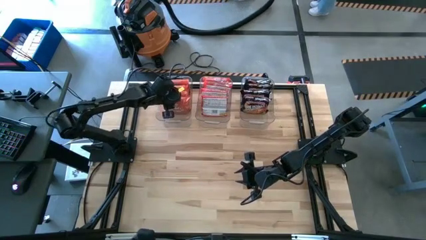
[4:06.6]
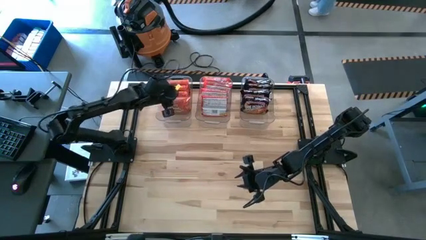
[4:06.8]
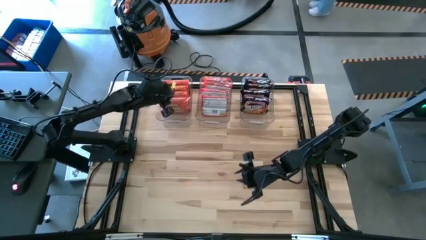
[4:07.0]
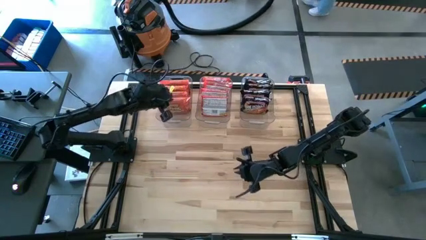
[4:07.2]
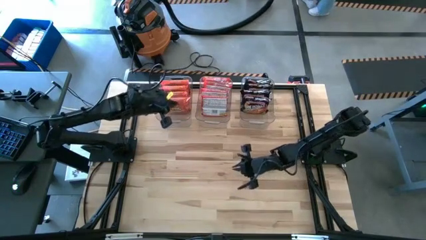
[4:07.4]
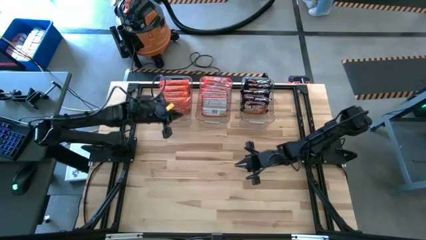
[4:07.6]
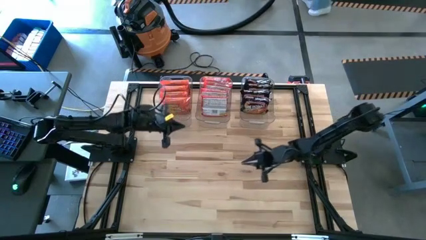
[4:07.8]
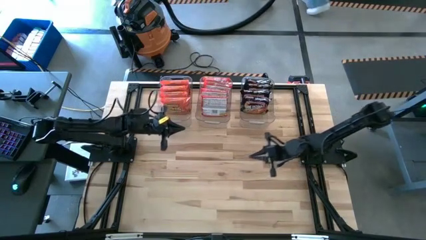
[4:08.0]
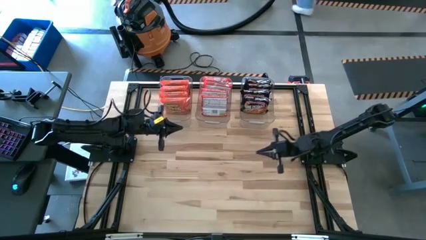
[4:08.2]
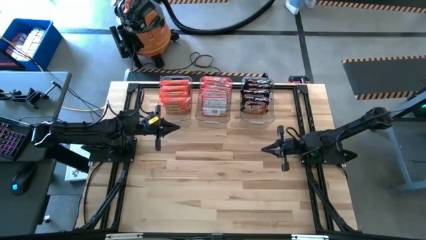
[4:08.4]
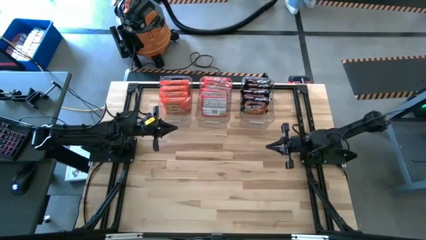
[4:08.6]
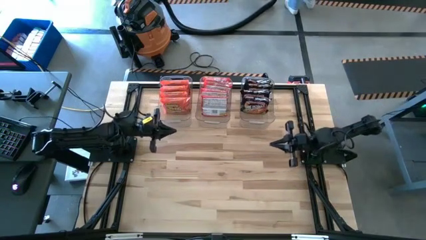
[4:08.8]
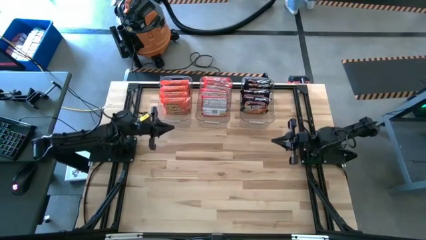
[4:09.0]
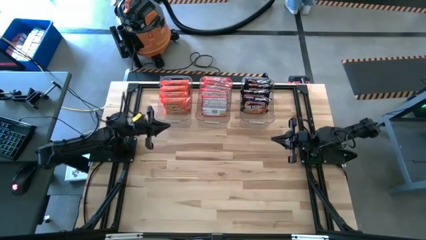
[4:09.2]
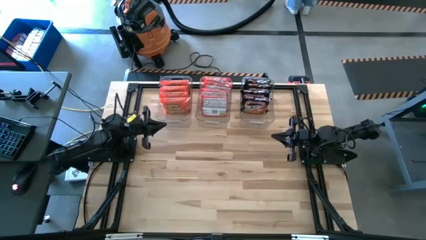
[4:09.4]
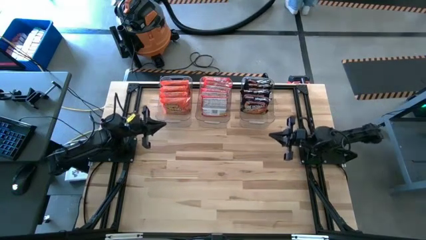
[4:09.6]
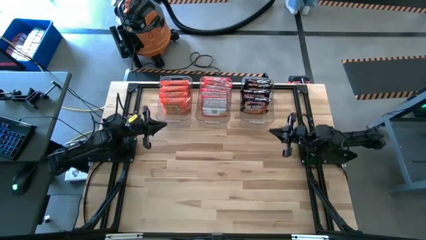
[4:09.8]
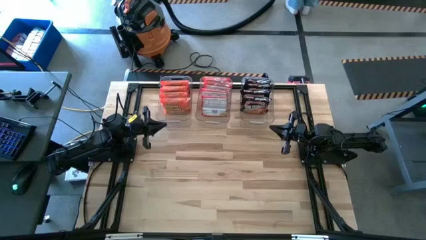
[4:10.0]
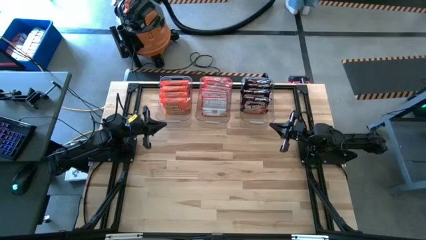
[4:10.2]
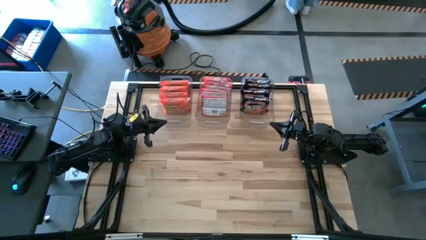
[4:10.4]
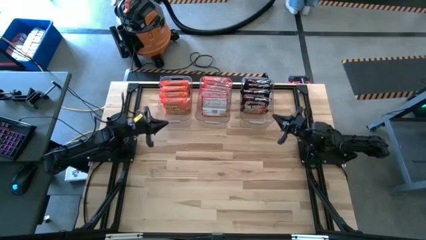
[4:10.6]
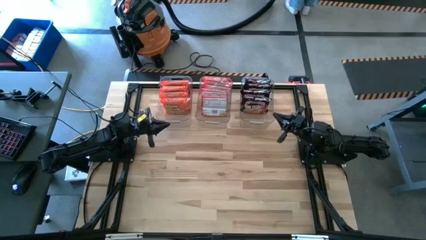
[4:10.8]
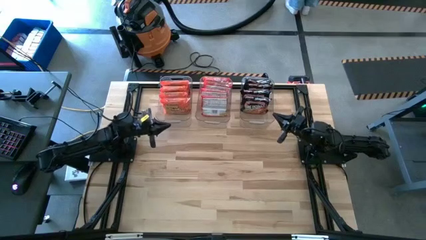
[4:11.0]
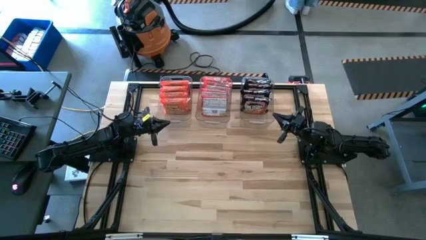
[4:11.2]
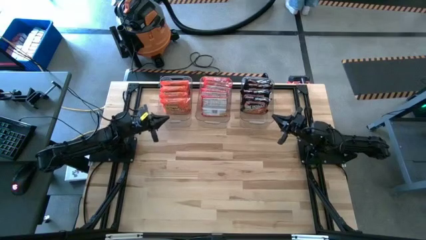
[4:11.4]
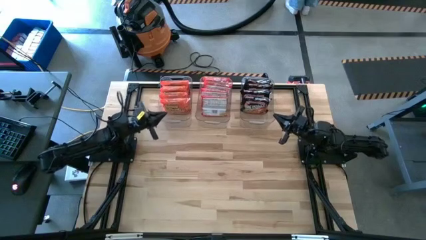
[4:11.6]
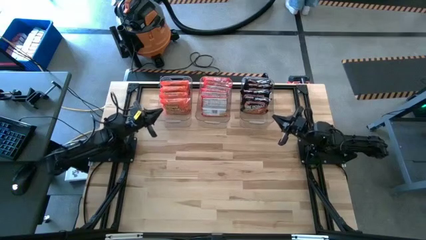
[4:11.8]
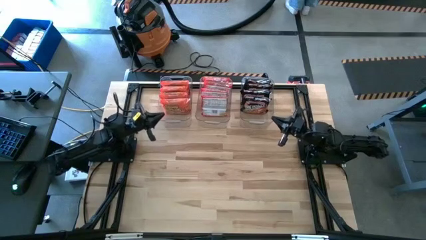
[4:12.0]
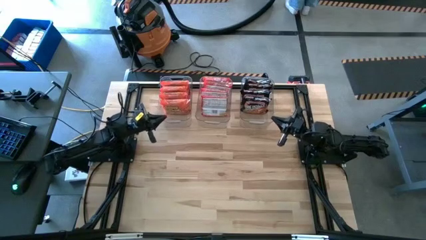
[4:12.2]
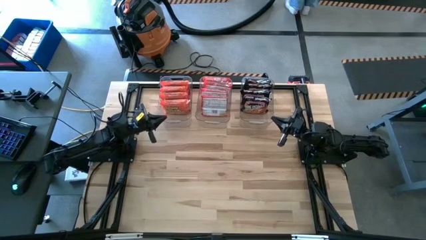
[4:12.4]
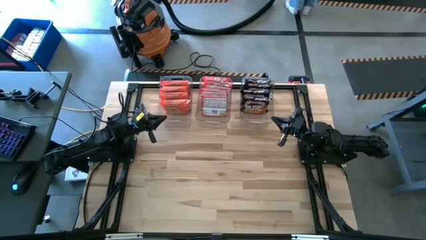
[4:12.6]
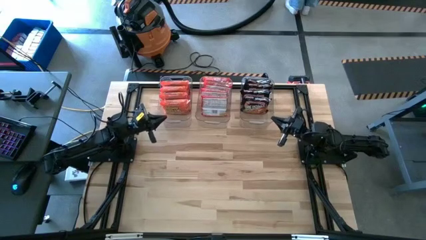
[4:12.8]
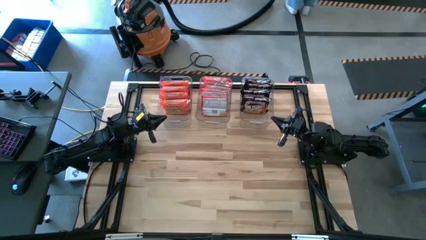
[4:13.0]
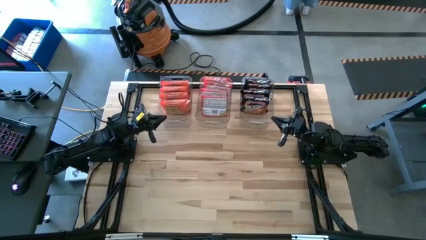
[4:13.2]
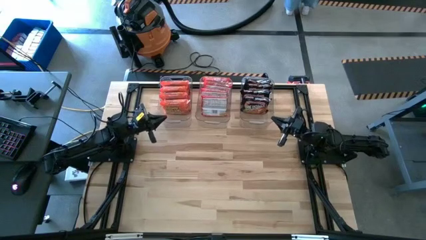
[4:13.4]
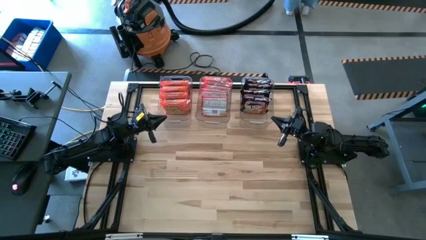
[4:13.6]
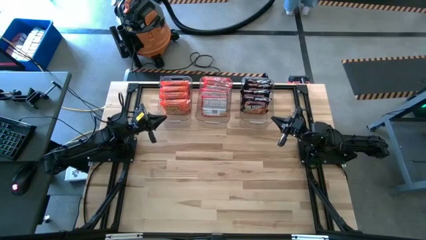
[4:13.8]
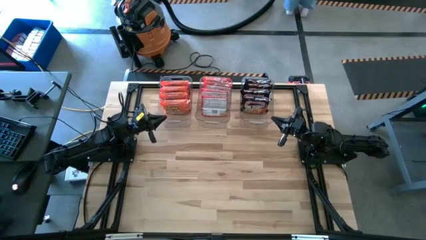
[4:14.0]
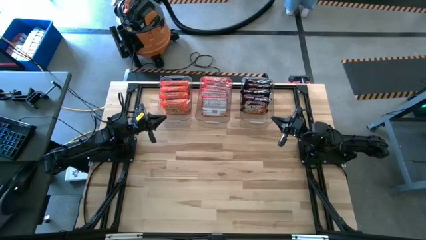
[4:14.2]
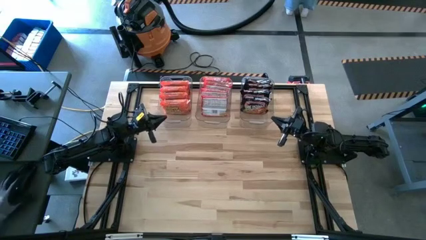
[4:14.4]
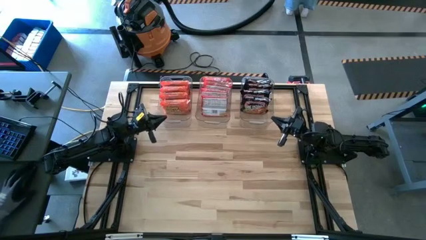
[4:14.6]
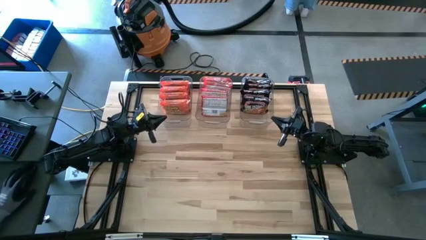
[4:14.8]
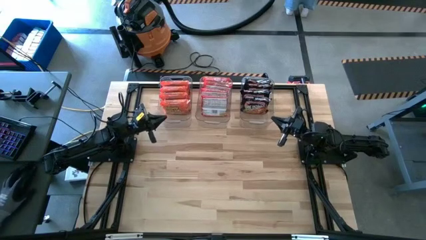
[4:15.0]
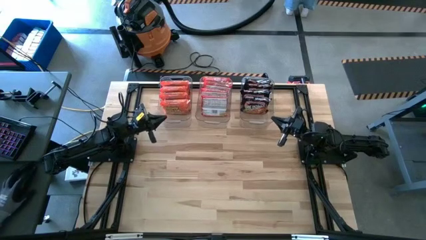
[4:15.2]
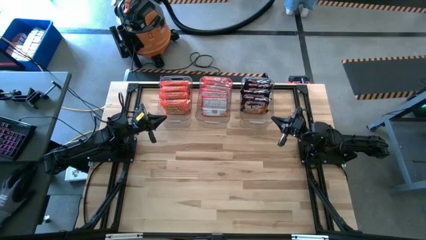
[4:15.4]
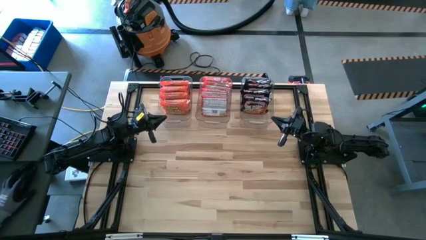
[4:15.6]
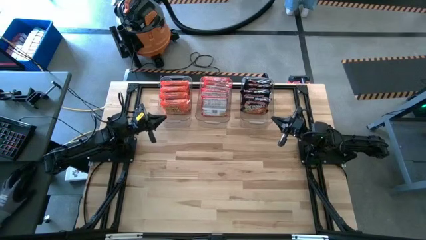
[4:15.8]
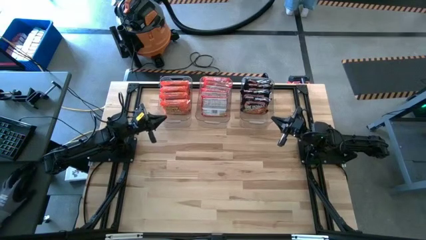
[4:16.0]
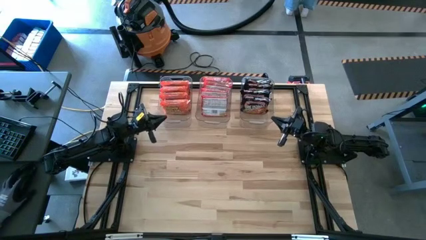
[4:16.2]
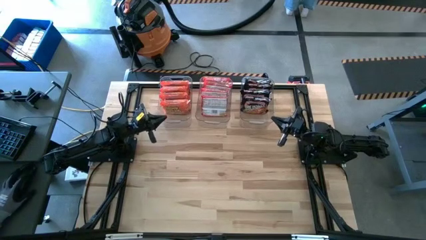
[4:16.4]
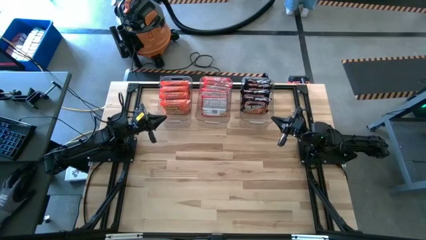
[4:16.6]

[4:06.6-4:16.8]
Task: Sort Maruchan noodles
Return to Home Position

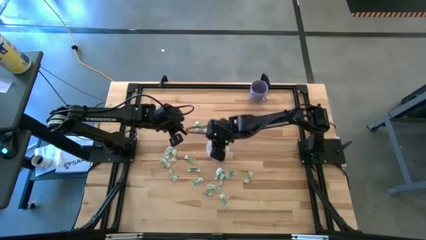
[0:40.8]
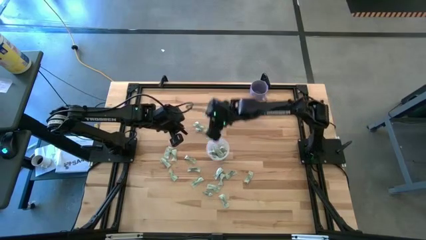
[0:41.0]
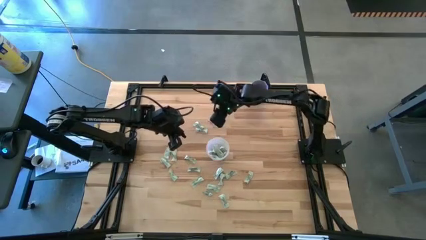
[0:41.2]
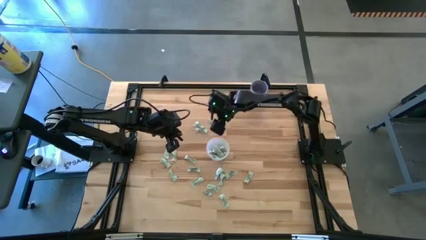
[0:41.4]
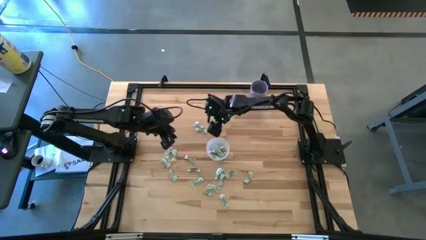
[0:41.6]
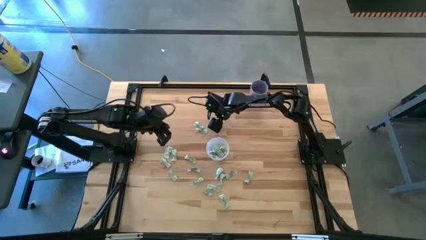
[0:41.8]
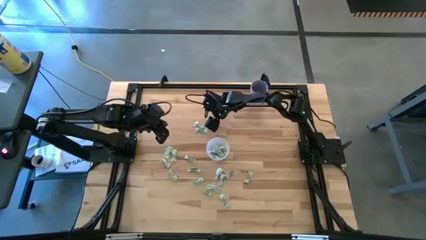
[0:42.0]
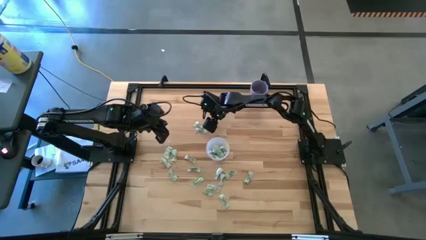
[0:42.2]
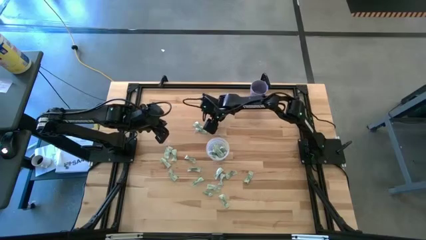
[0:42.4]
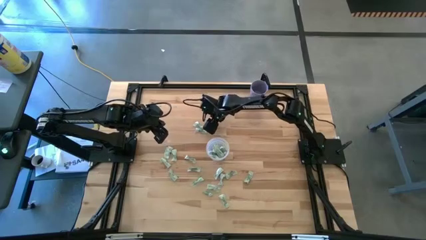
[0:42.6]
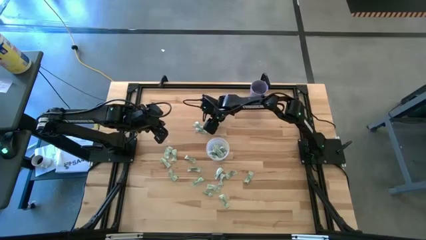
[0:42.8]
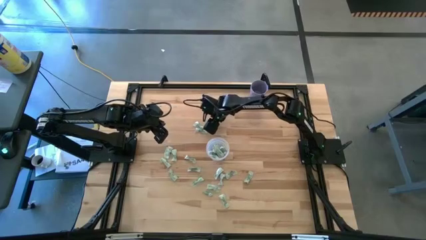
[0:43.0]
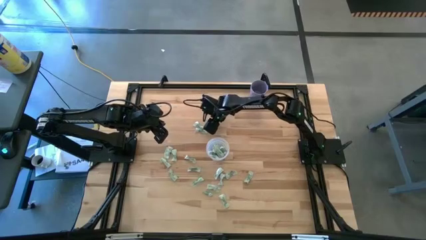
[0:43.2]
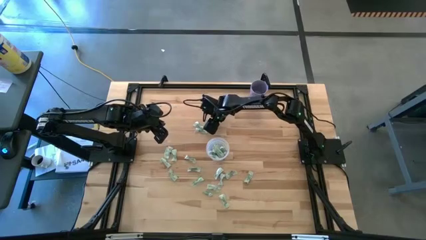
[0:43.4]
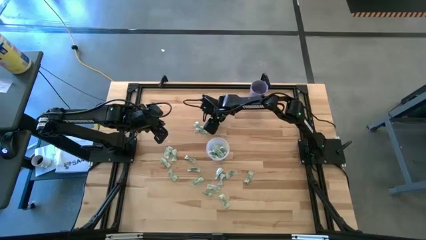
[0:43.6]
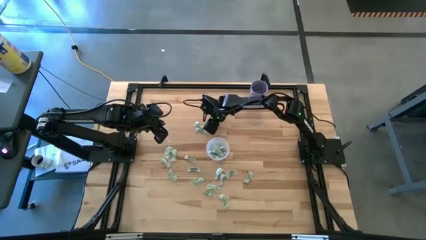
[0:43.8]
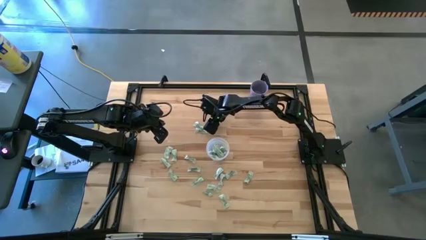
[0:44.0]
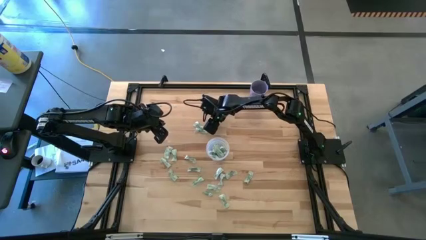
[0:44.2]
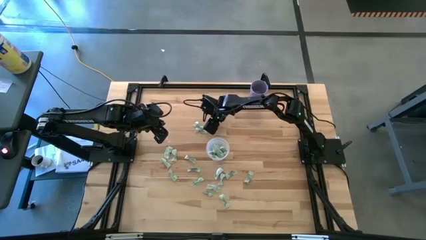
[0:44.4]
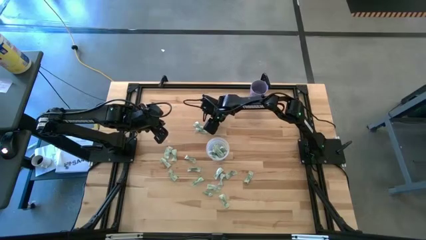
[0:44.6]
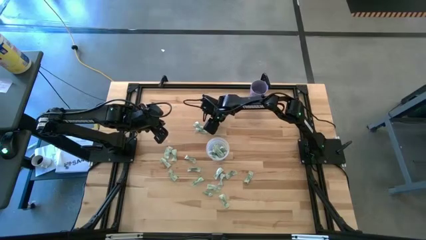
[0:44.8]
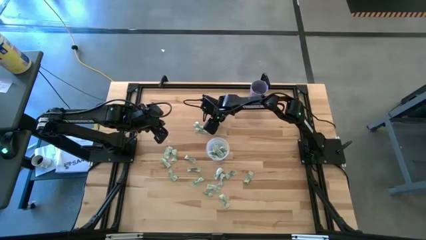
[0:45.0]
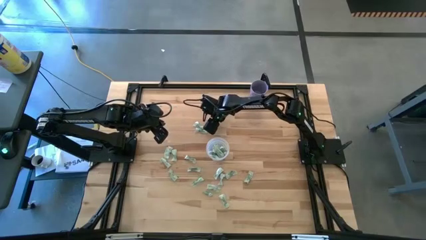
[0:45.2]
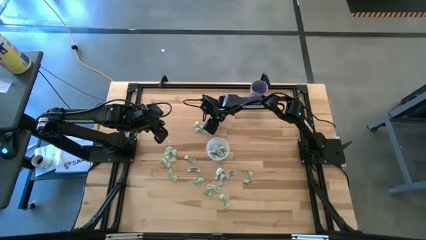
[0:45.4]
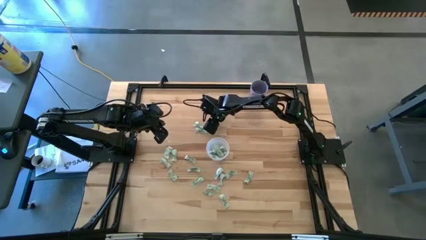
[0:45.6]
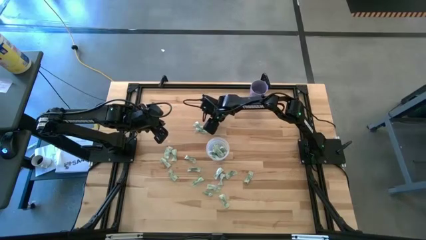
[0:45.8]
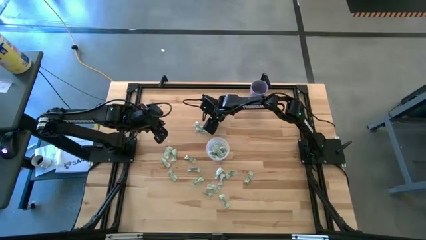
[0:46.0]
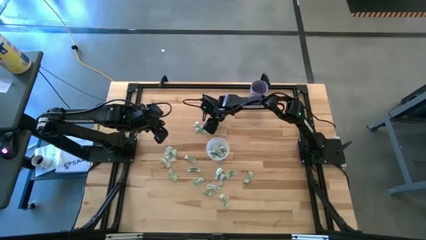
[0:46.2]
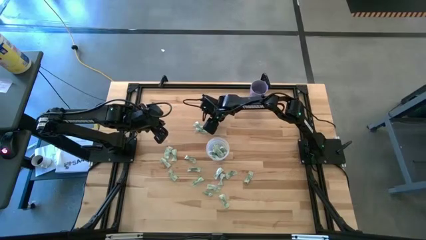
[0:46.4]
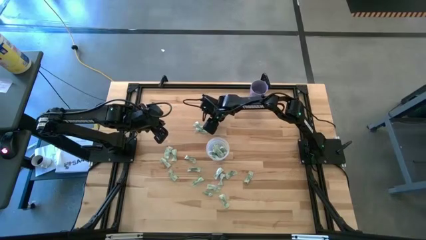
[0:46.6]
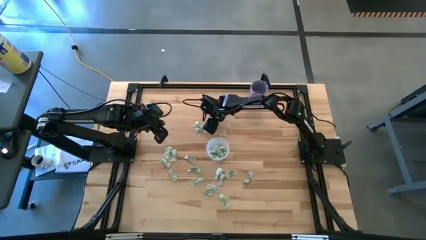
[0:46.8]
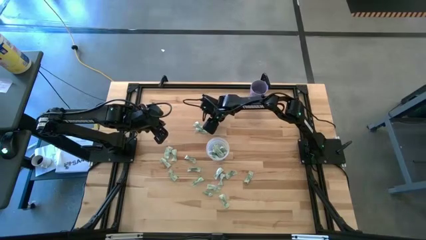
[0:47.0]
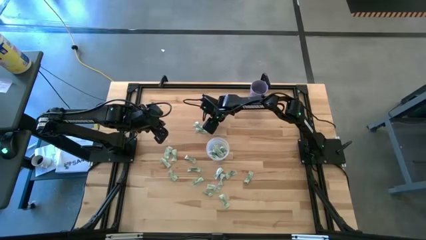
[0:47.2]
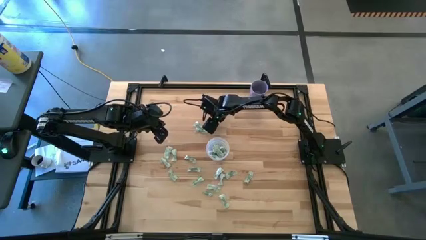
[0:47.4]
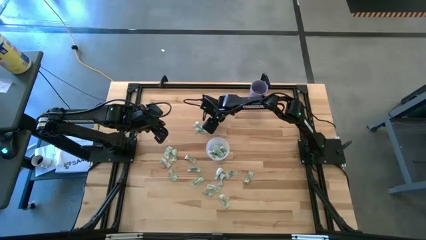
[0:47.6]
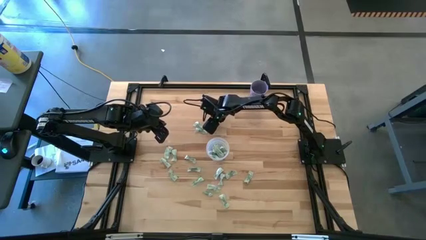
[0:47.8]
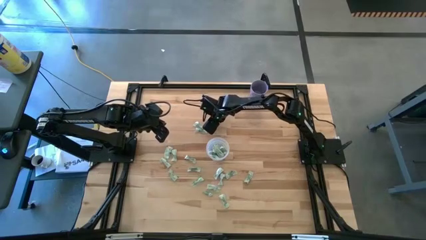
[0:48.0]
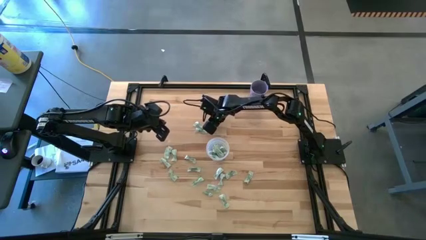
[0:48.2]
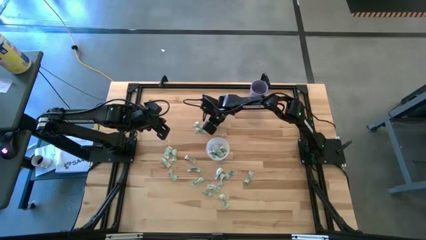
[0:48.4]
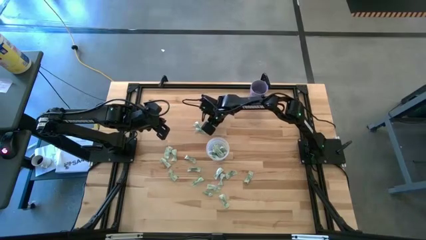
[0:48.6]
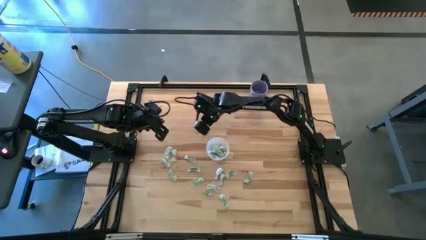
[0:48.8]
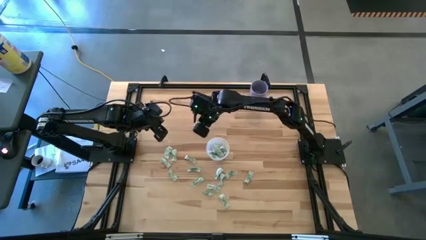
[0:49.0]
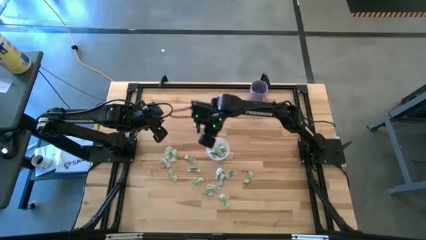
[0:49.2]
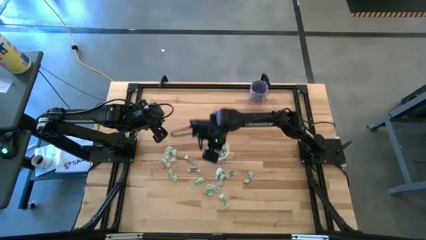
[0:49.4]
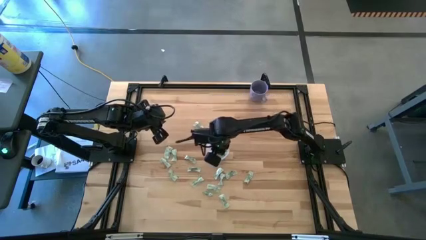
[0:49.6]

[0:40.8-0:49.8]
Task: Pick and place Stevia / Truvia into bins
Put the green stevia packet into the transparent container
